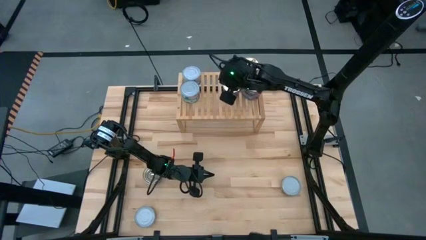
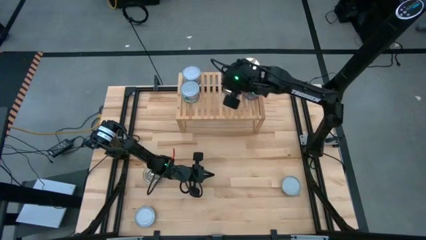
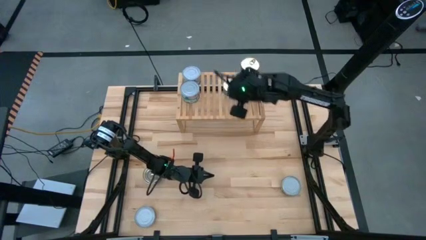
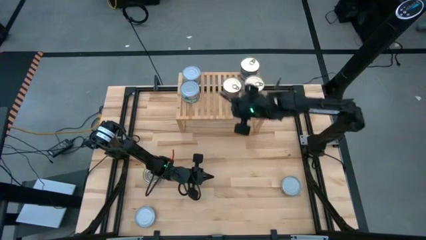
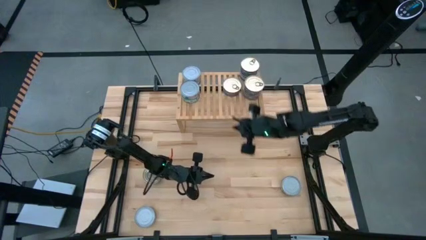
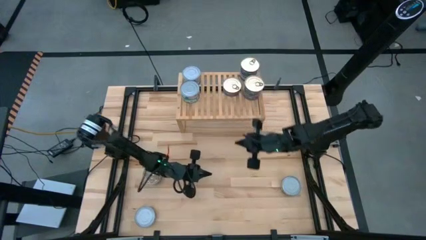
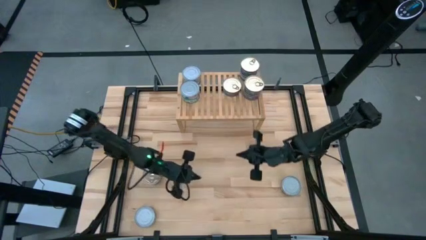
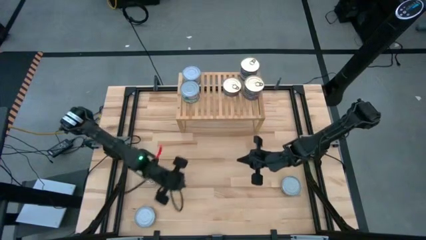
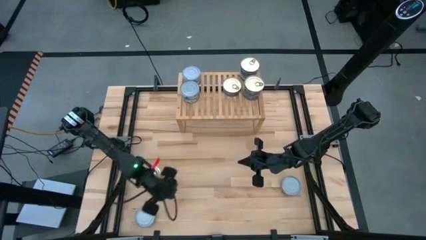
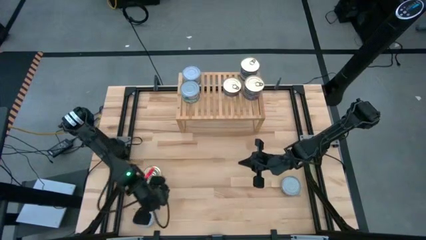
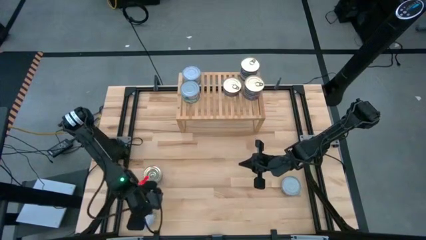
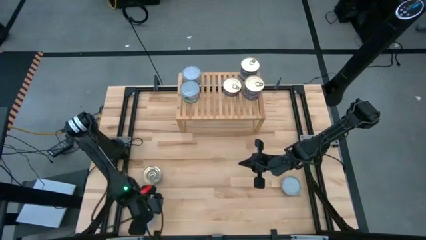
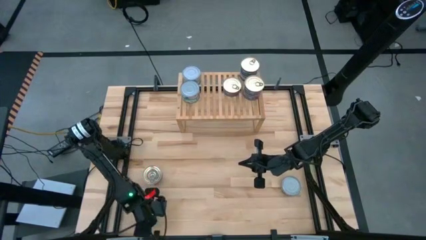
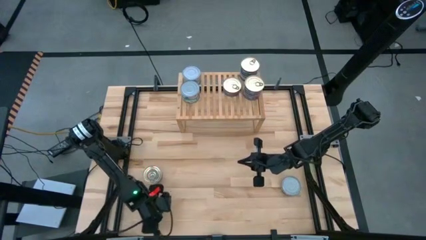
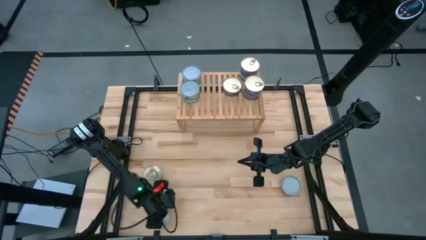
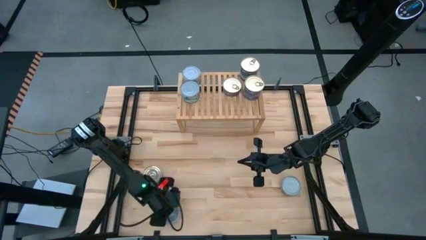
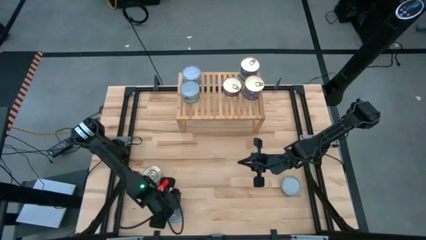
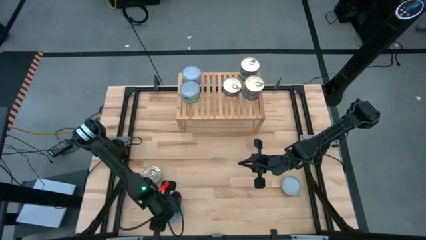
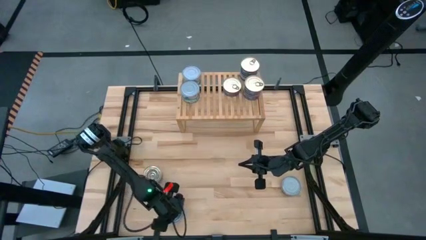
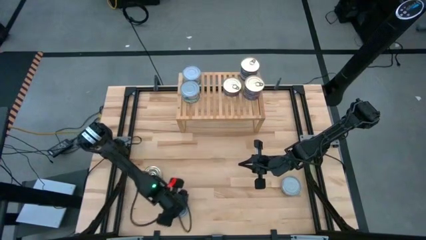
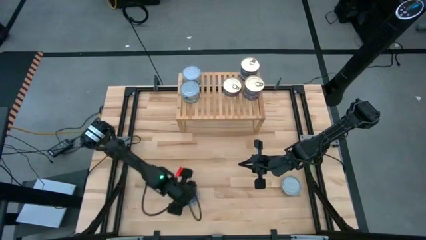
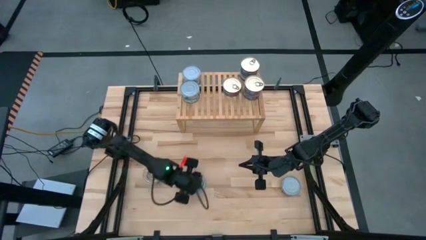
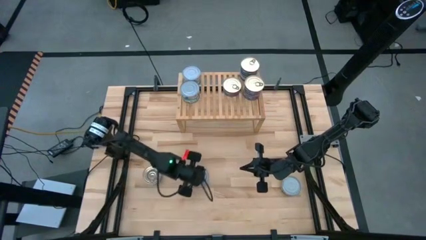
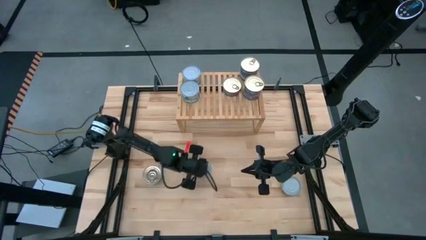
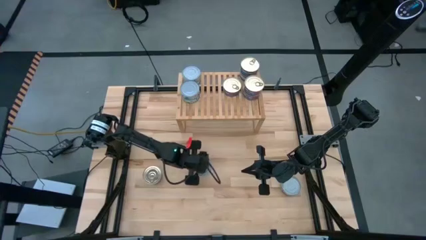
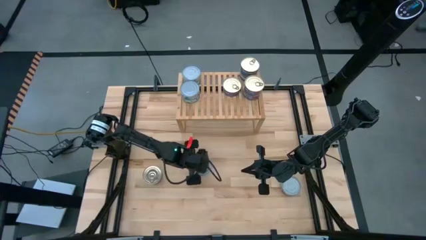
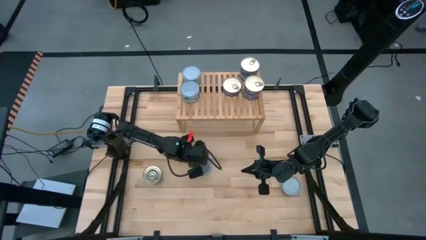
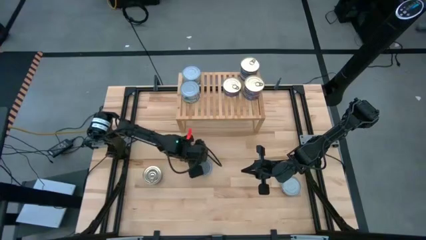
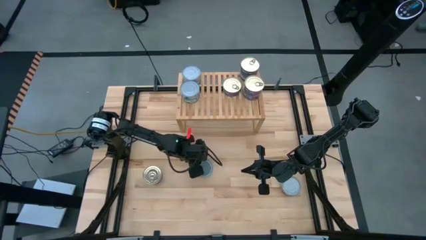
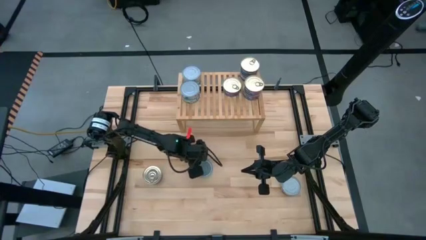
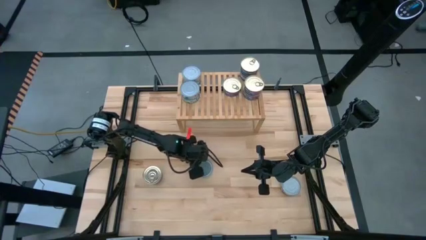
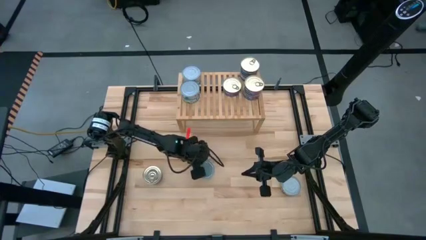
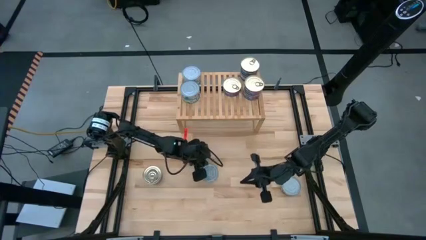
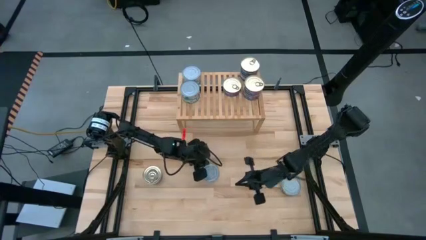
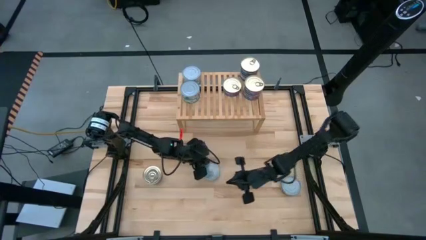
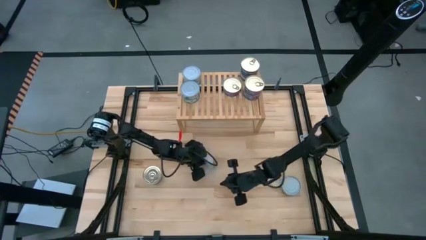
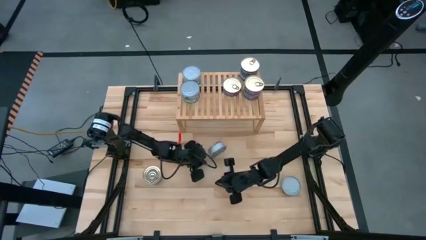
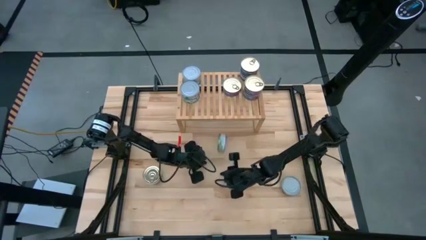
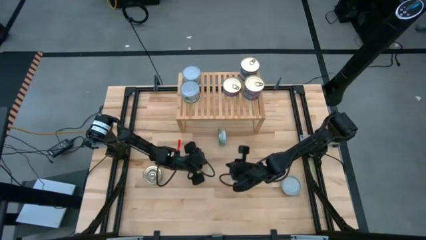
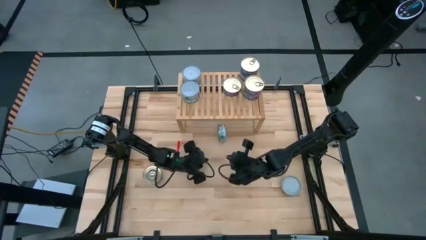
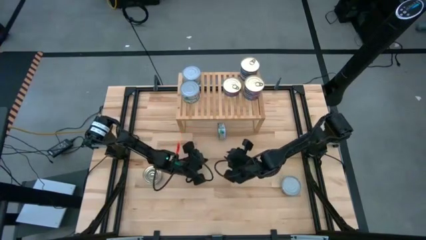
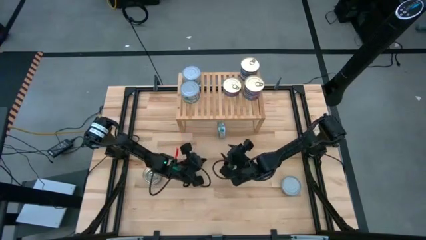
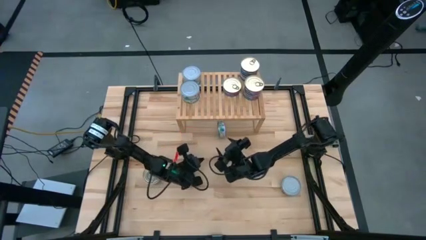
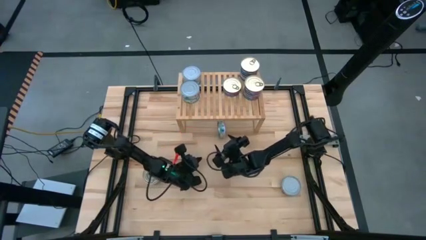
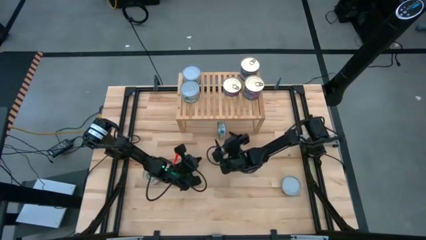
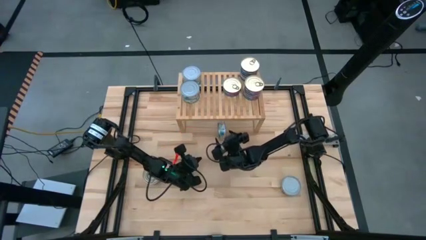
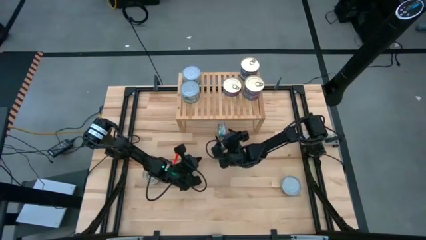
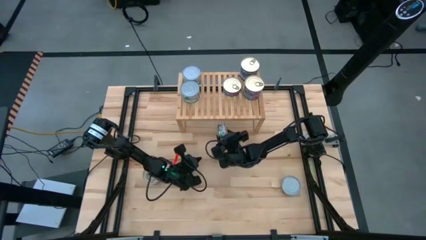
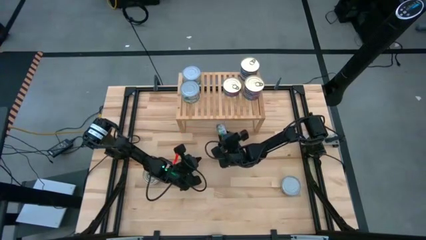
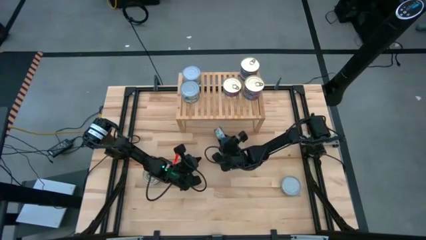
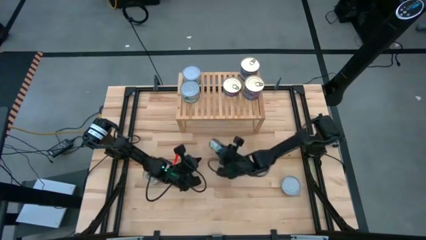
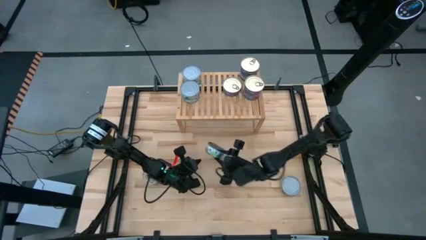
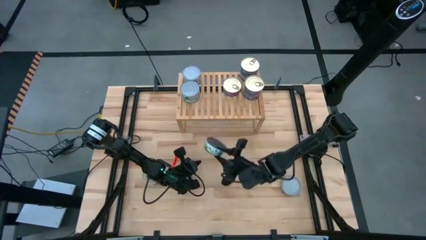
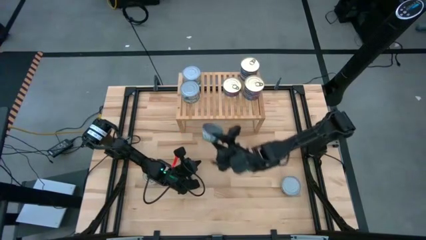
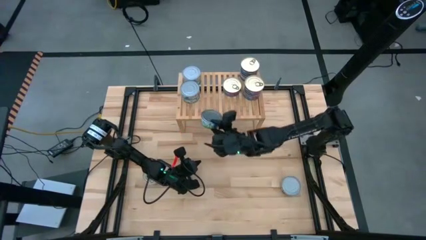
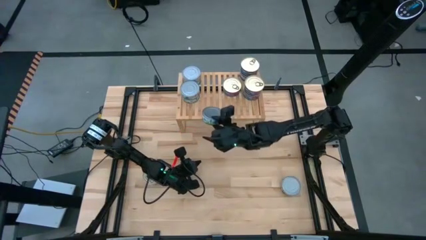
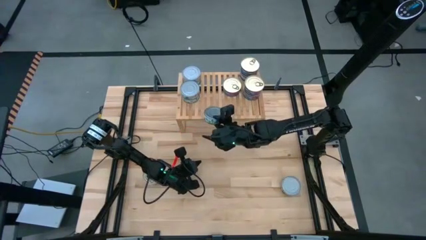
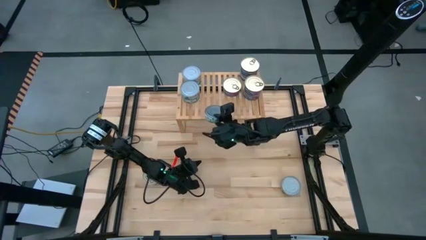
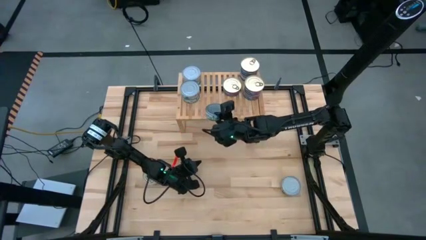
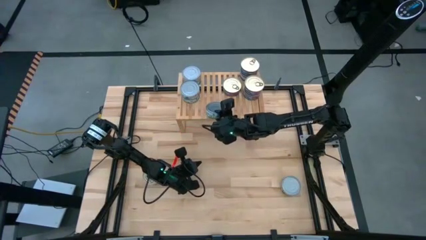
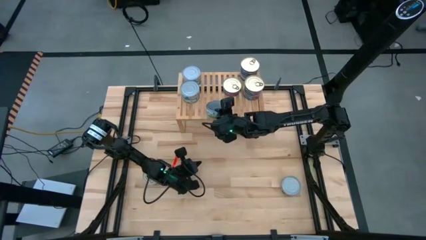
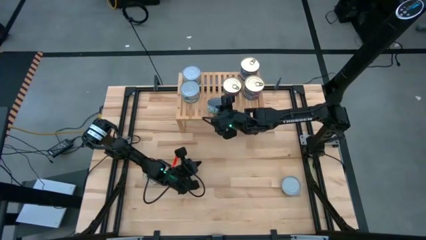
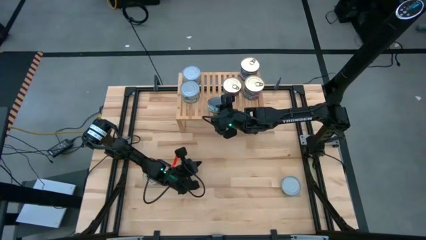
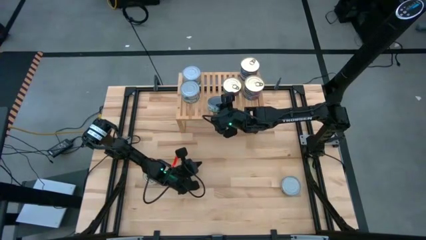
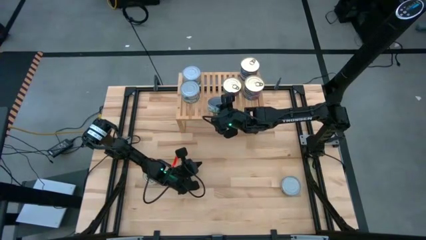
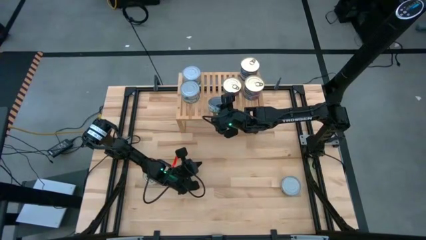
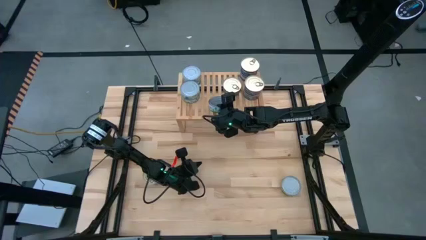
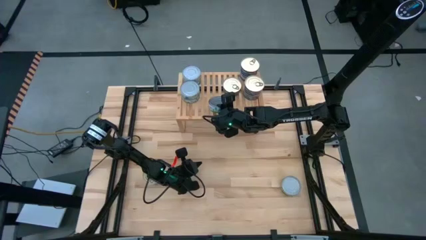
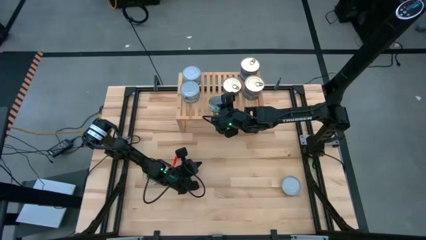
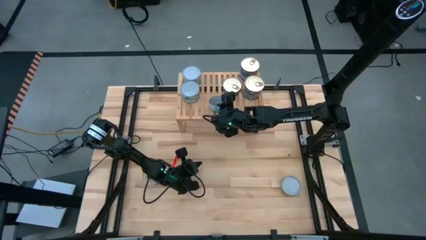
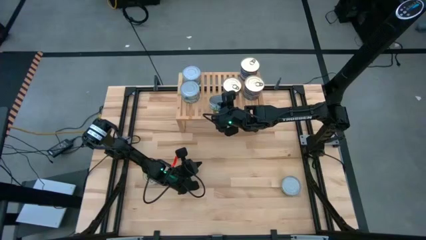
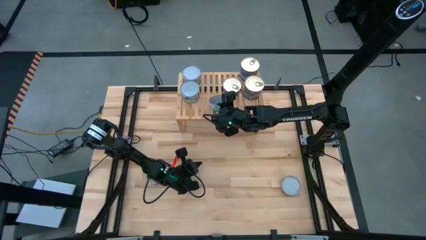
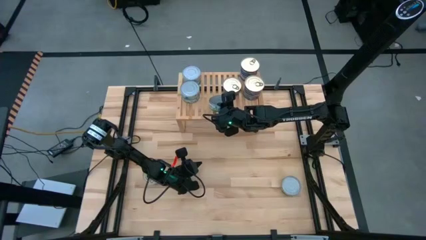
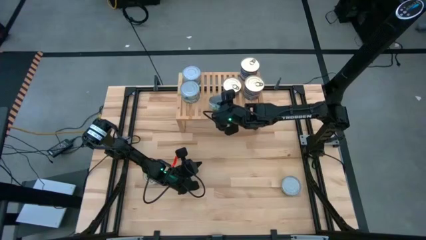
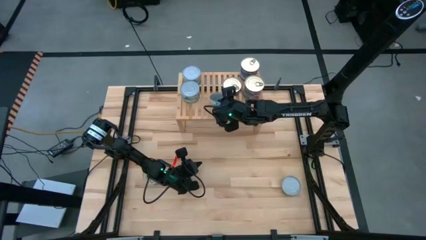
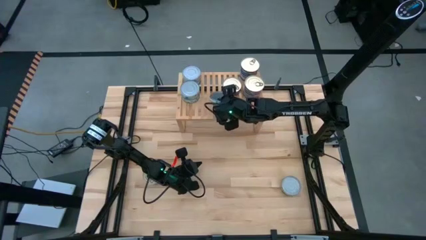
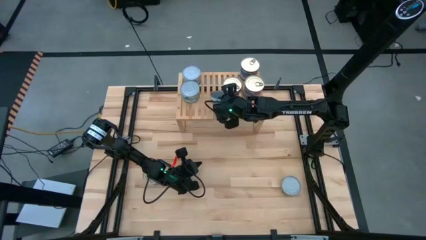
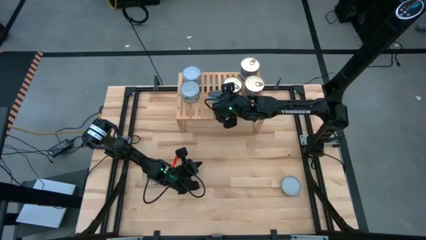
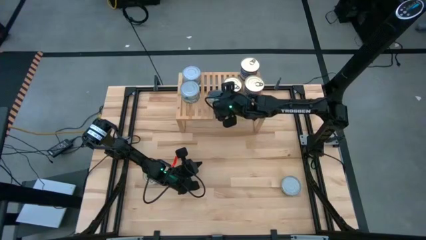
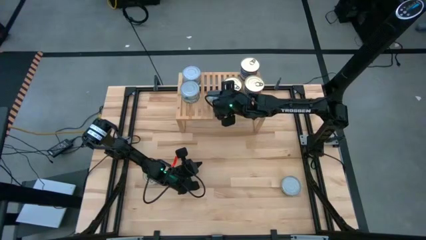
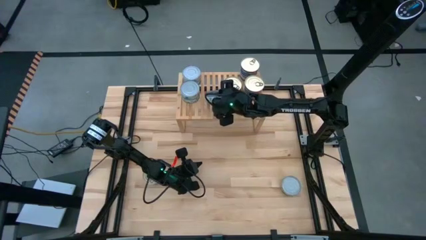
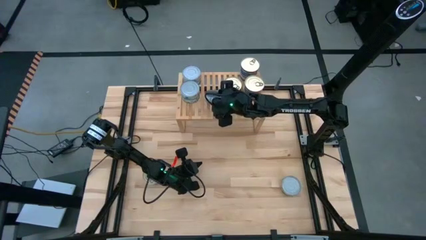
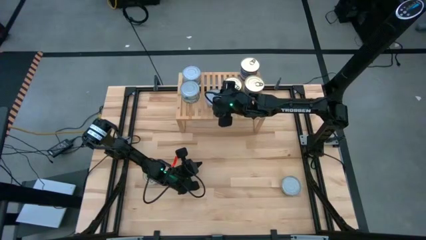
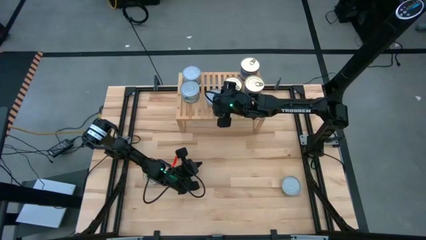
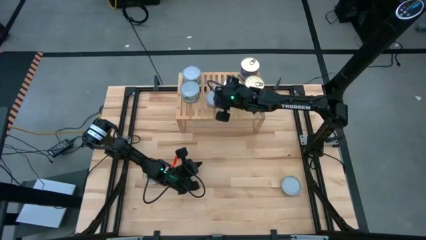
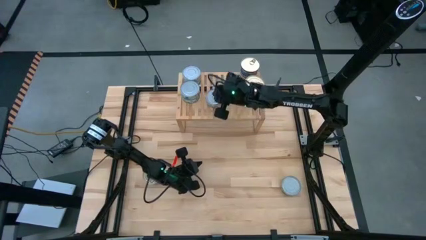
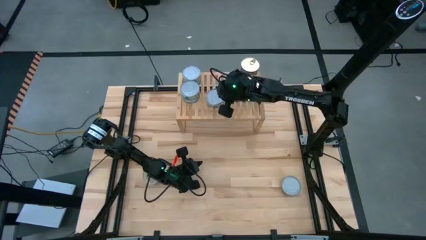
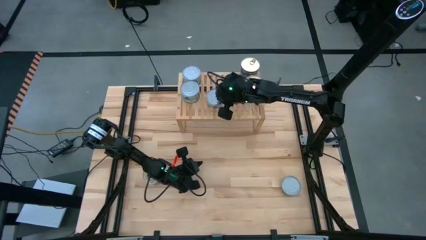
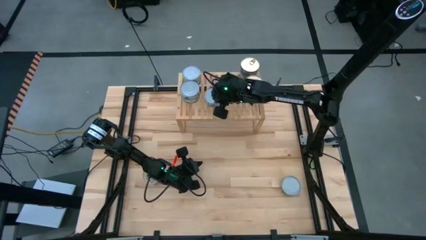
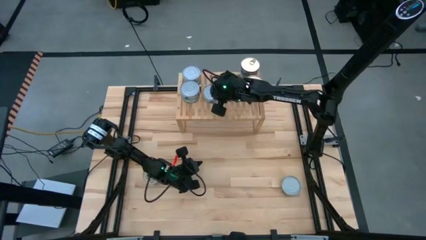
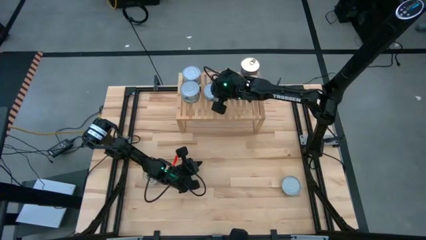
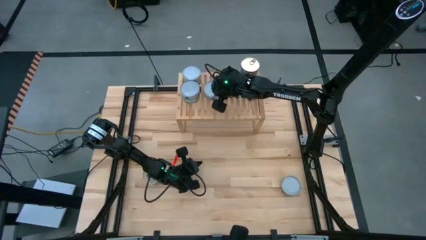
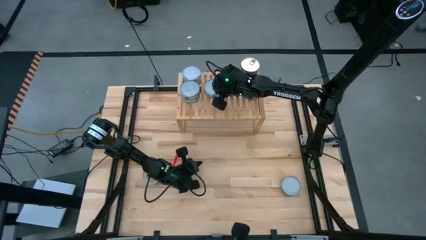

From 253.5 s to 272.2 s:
Task: Stack canned seafood by type on shelf
Put the green tuna can on the shelf
